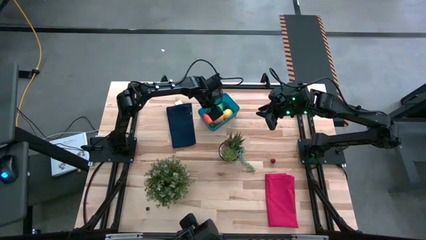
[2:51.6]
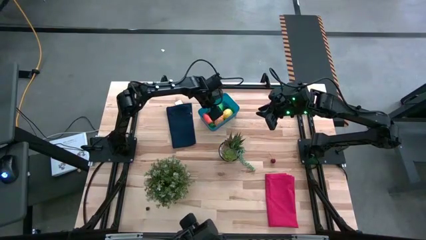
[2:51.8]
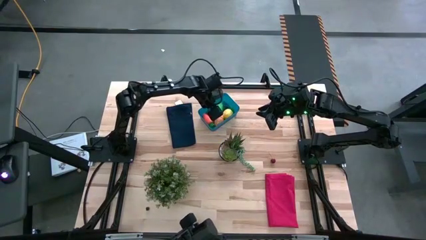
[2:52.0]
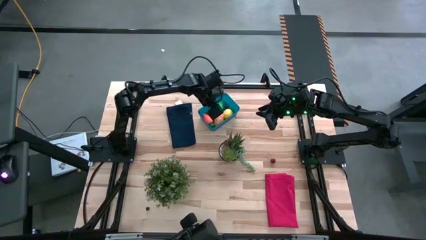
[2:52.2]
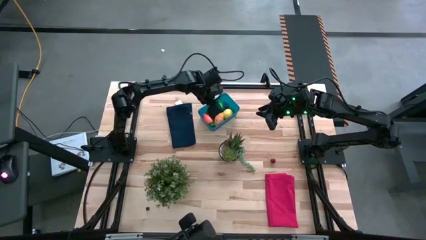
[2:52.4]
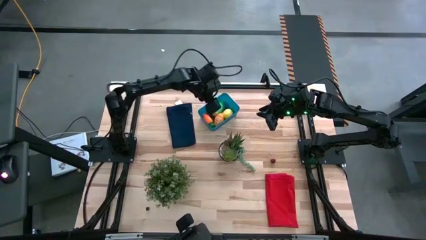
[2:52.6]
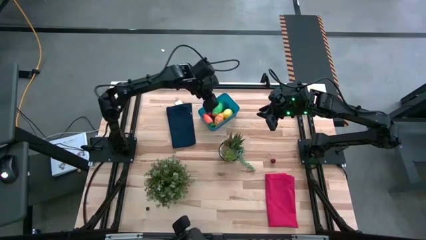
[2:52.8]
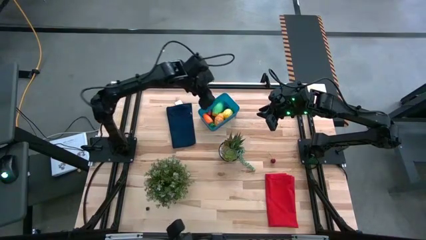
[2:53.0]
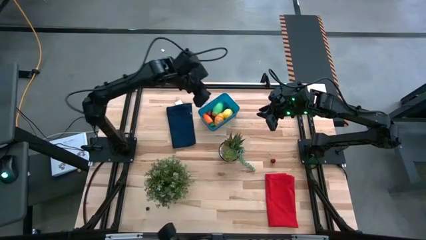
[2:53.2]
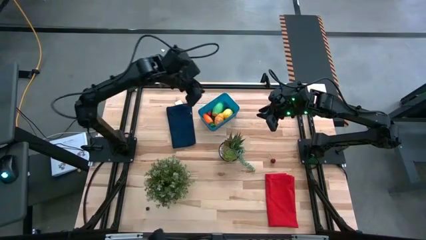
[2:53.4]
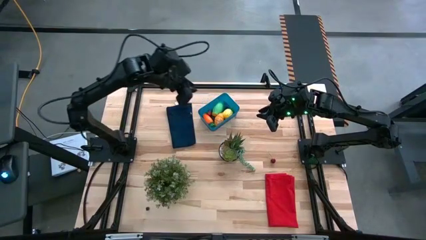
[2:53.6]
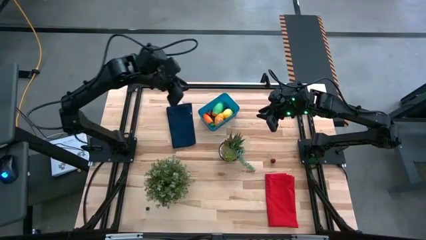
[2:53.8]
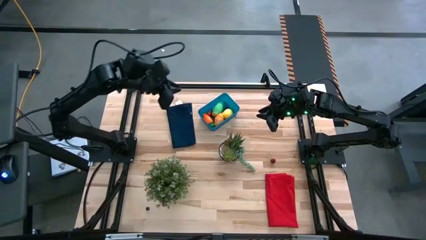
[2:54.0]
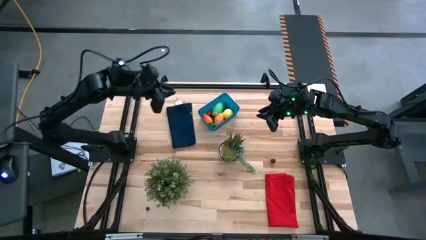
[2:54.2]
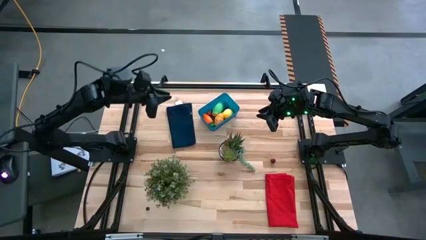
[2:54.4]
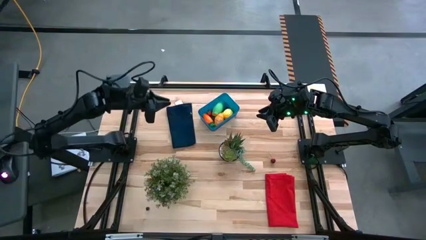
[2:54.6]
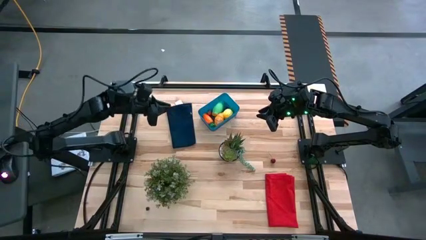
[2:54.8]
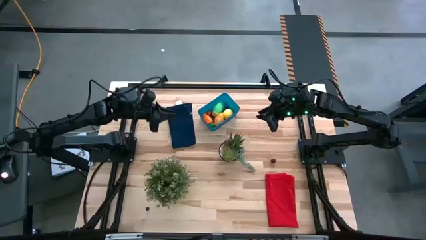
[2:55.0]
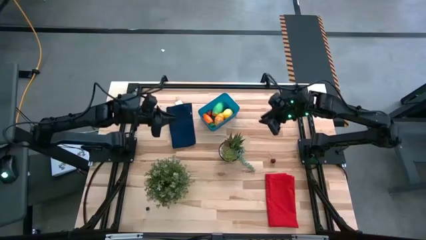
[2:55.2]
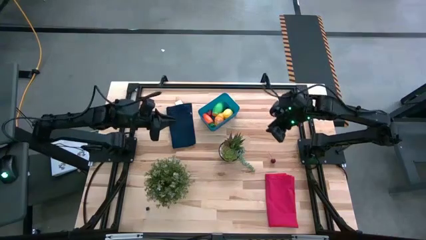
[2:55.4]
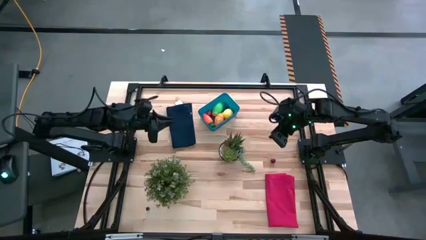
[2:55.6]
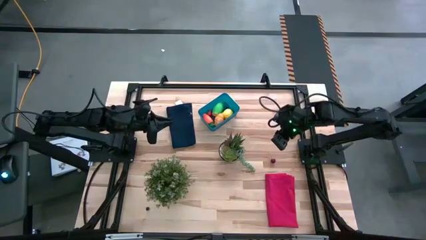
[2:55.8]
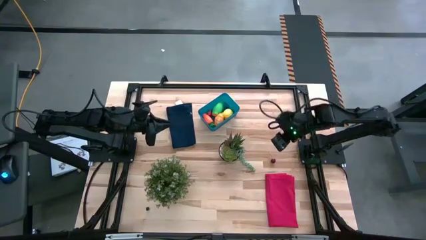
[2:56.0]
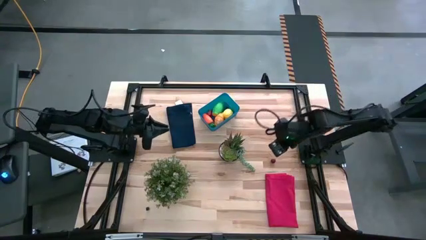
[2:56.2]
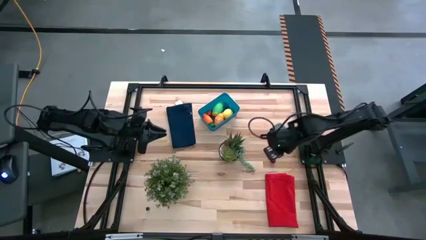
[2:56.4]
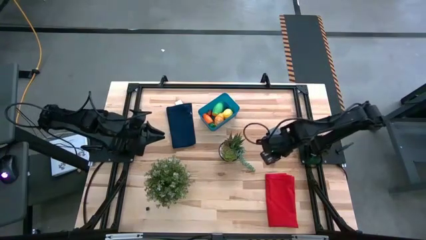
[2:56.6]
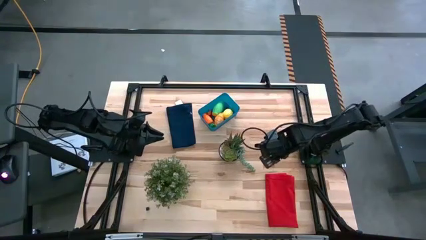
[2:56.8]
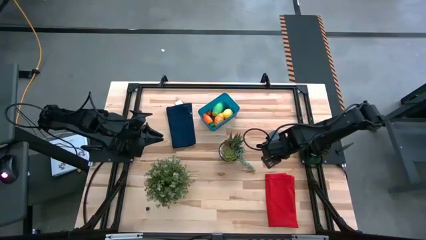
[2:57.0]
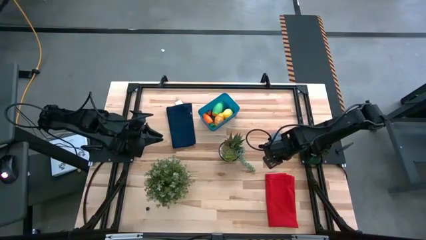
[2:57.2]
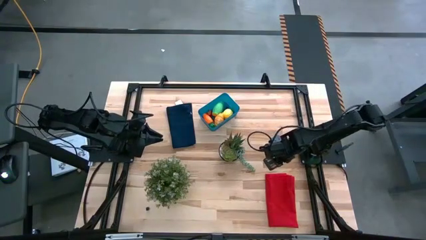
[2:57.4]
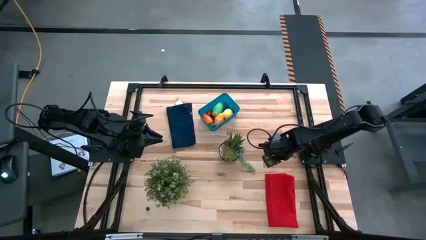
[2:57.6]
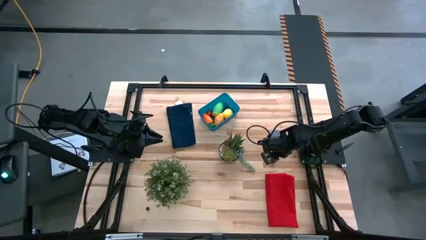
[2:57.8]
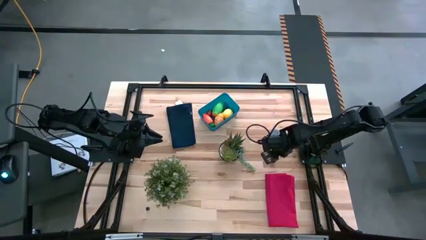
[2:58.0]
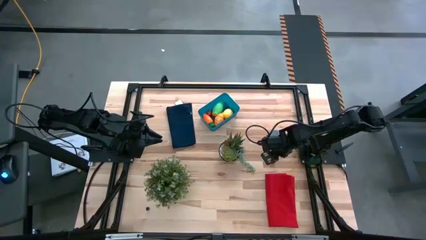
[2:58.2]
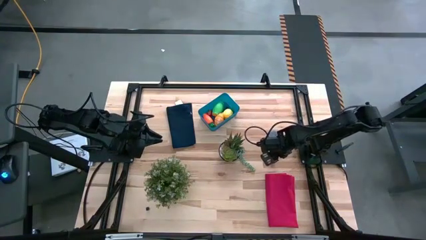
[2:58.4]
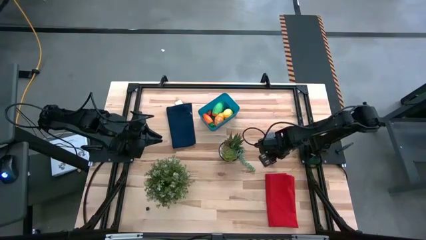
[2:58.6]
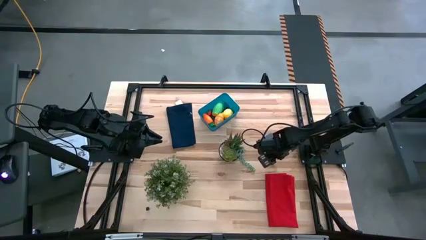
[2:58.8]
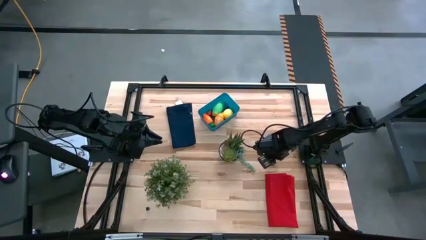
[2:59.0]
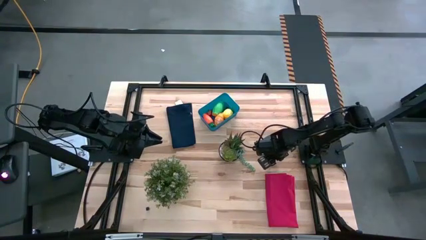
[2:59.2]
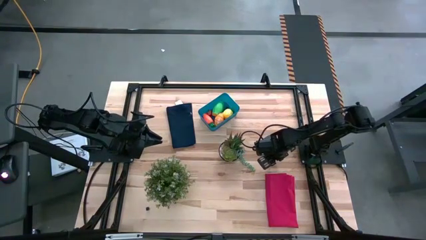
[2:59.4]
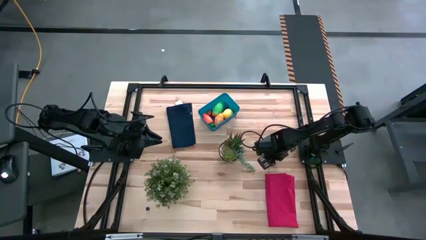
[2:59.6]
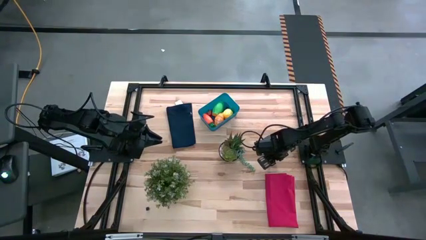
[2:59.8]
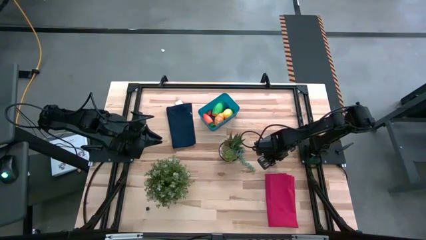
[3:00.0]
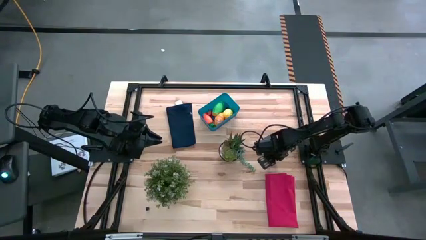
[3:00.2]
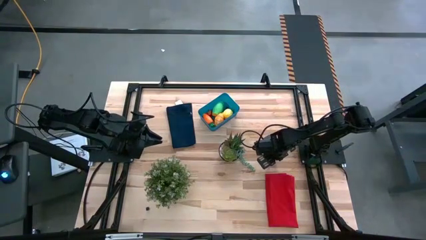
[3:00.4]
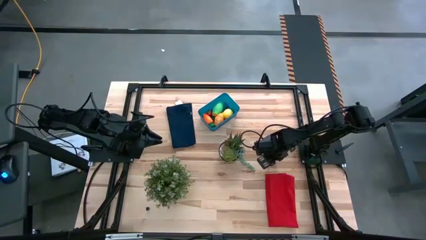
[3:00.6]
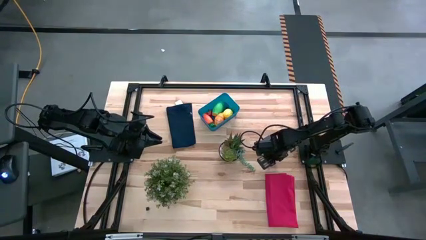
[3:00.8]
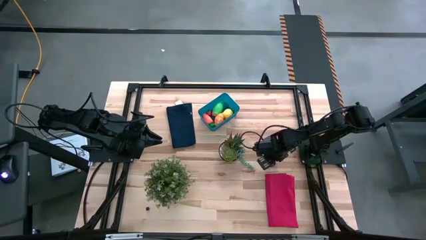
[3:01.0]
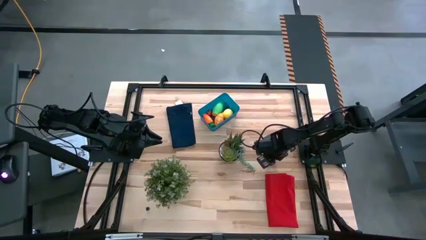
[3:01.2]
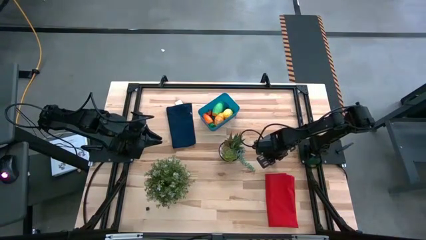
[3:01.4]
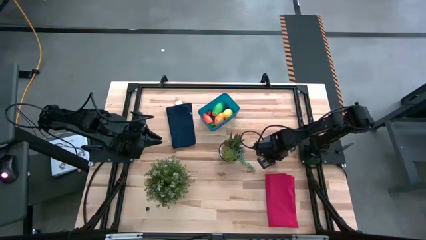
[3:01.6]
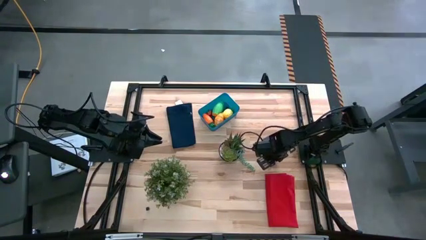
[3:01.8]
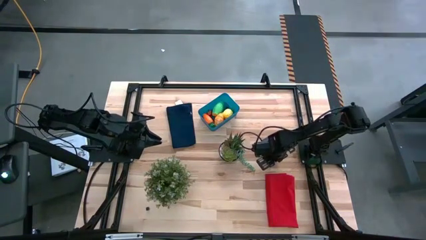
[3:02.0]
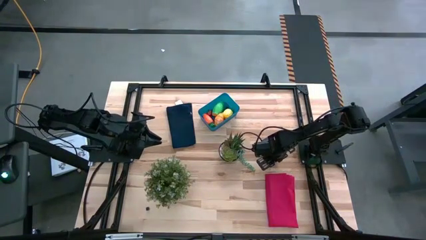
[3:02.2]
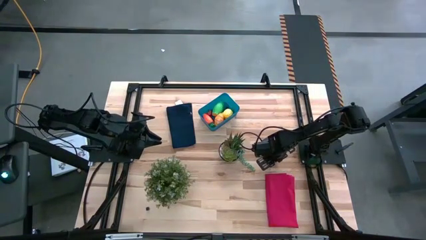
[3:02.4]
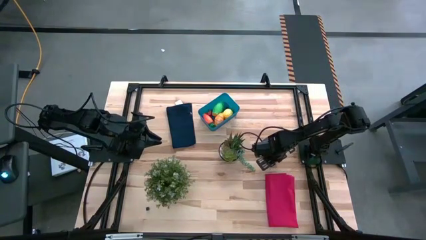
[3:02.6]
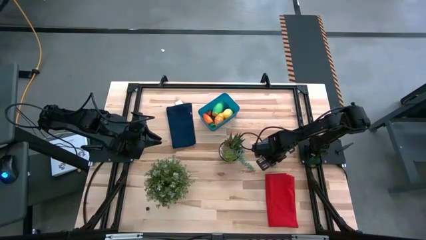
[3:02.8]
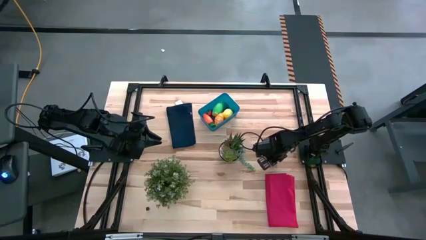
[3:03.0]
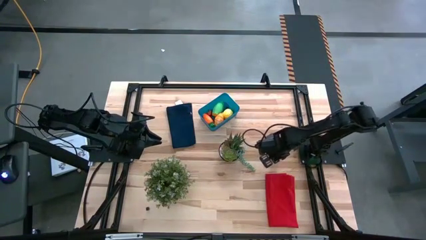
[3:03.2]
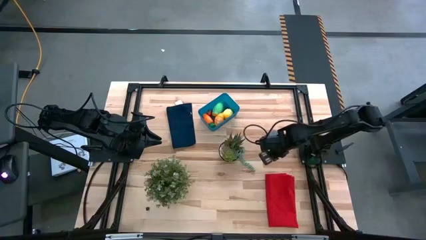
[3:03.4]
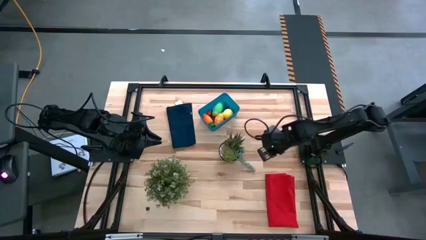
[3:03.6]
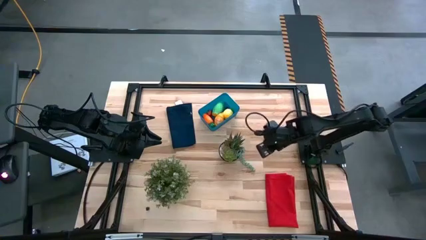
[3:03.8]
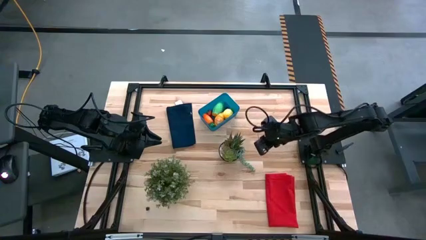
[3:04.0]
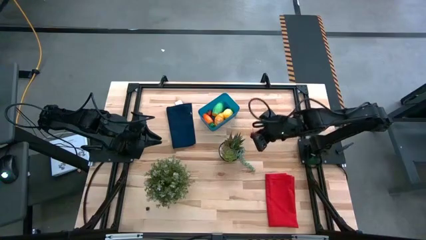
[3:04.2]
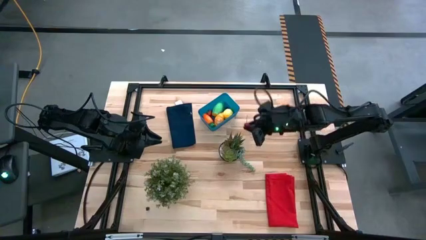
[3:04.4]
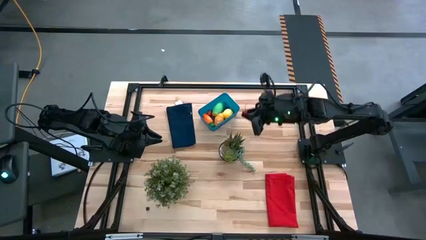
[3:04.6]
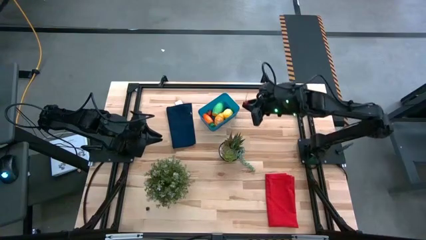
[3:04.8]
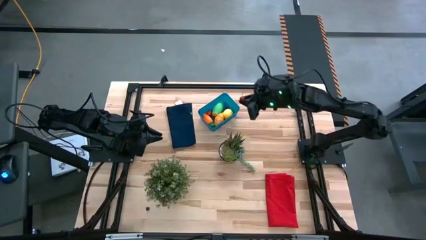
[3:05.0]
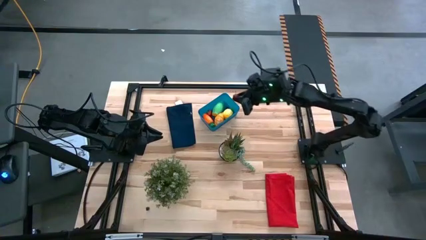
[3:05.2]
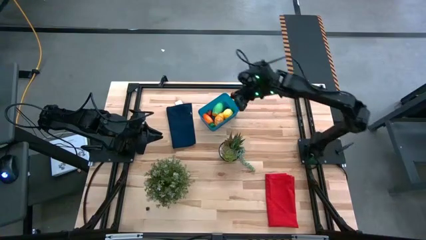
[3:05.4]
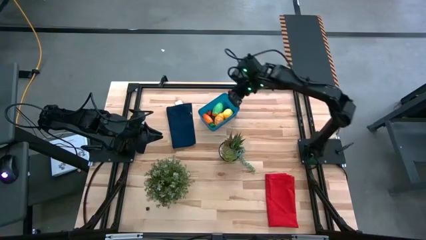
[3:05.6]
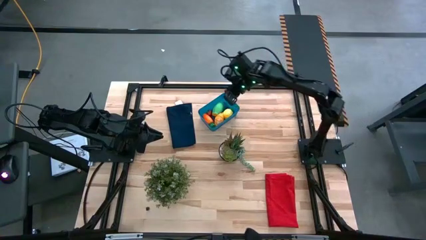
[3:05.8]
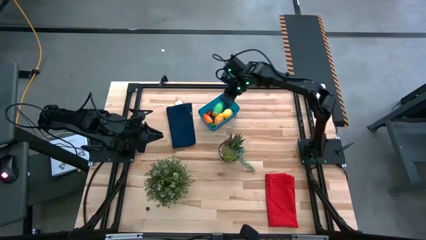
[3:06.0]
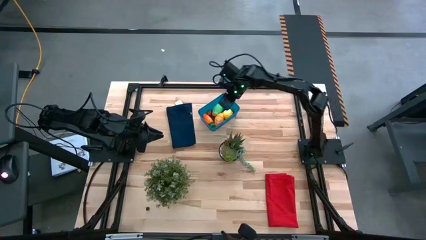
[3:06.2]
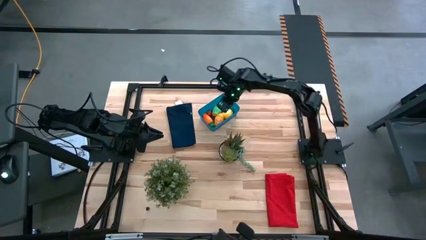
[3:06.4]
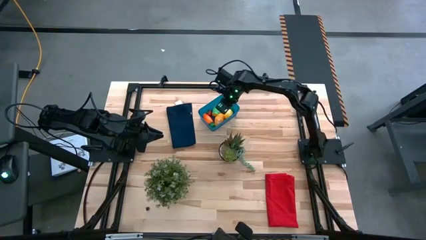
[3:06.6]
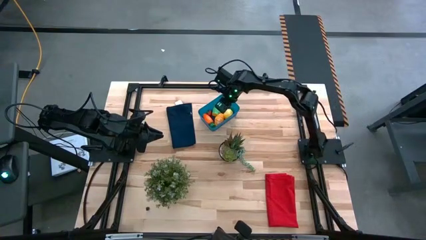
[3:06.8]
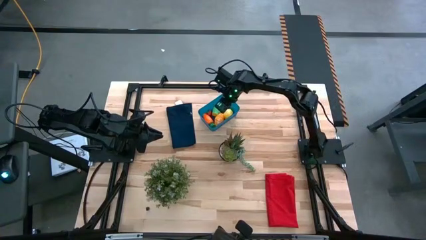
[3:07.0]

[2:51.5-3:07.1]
Task: Pick and placing Produce into tupperware
Put the red cherry into the bin
